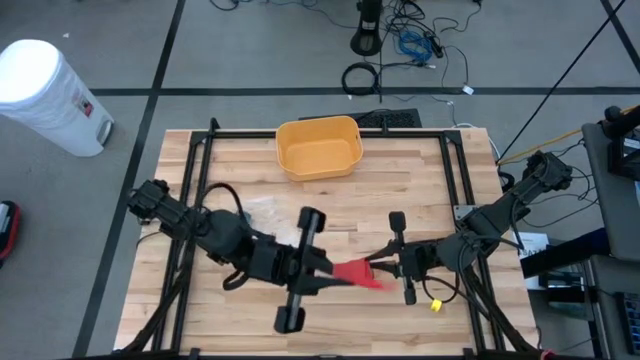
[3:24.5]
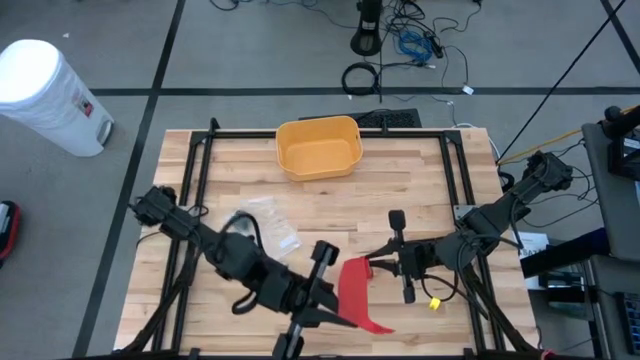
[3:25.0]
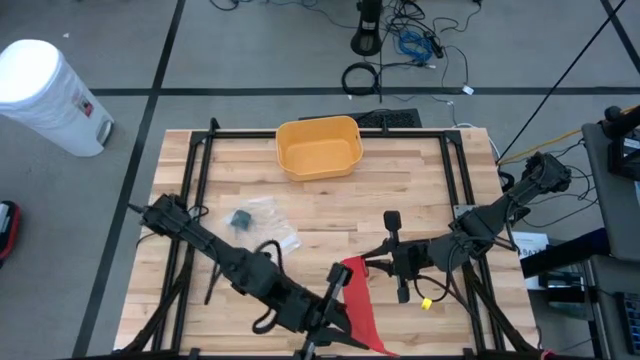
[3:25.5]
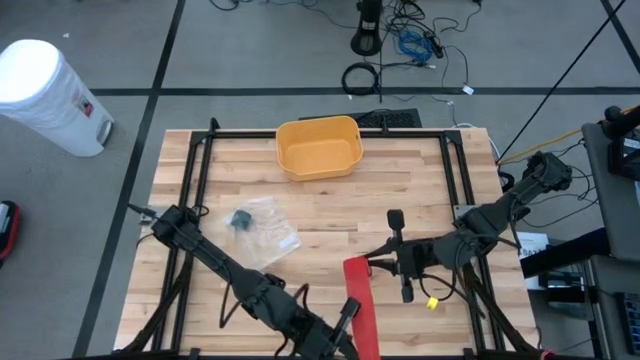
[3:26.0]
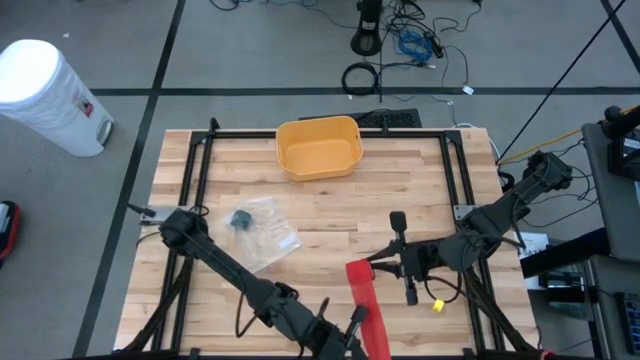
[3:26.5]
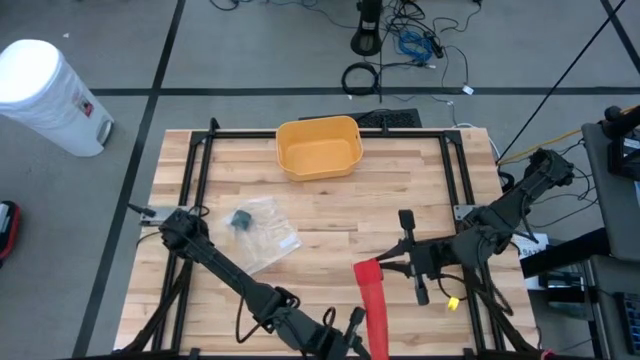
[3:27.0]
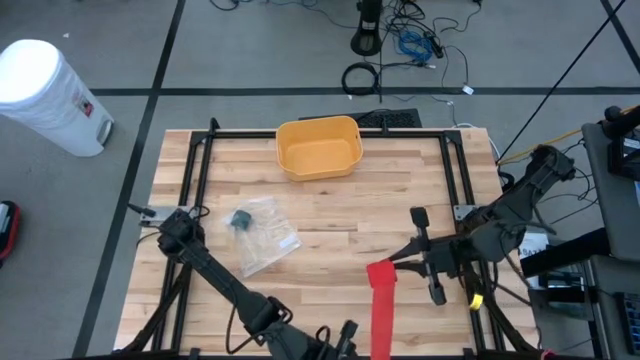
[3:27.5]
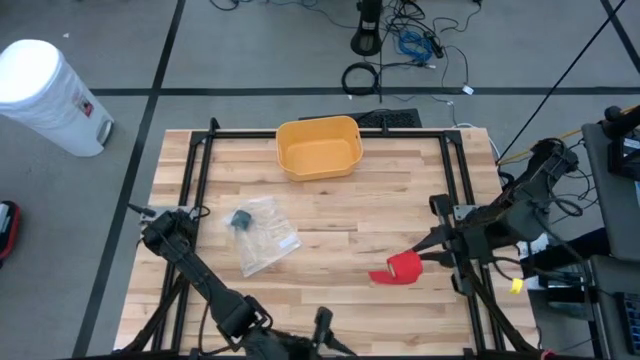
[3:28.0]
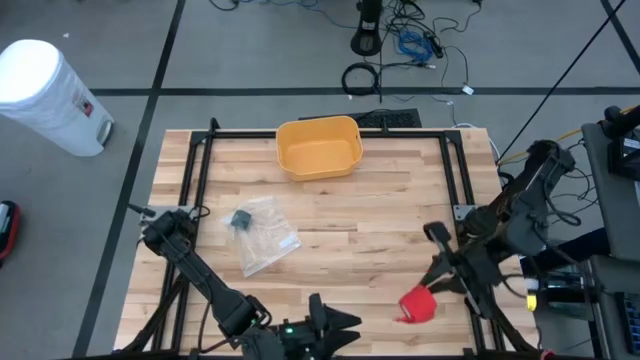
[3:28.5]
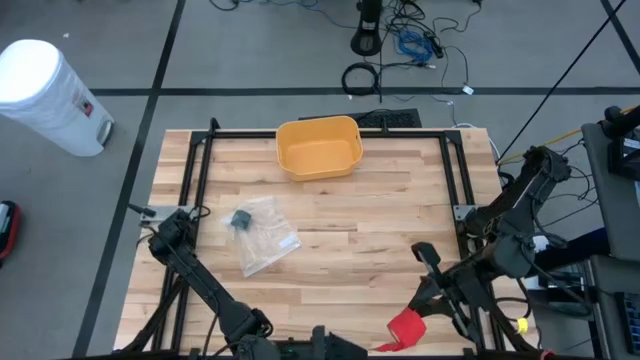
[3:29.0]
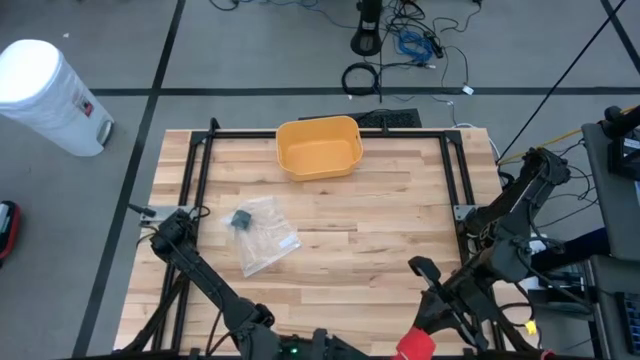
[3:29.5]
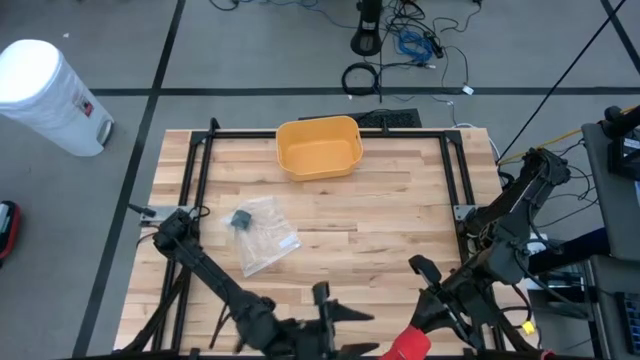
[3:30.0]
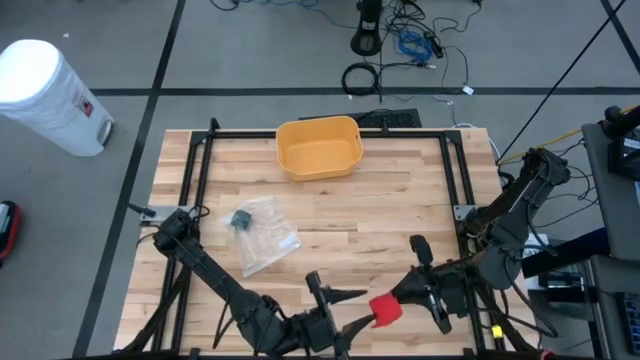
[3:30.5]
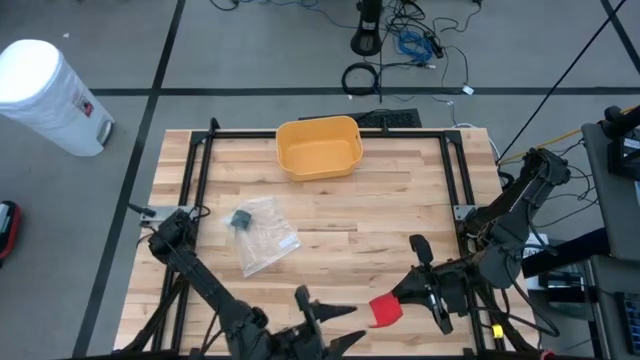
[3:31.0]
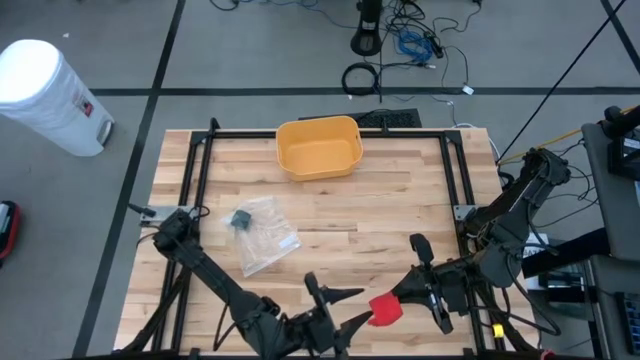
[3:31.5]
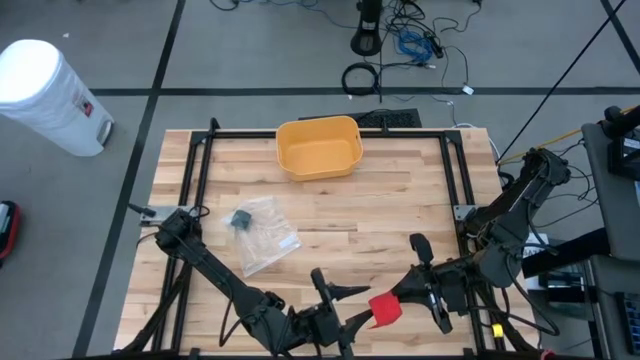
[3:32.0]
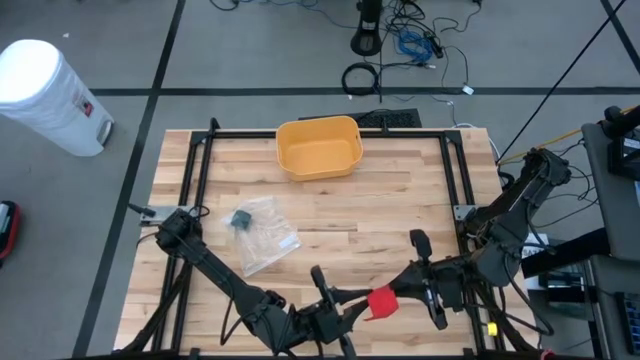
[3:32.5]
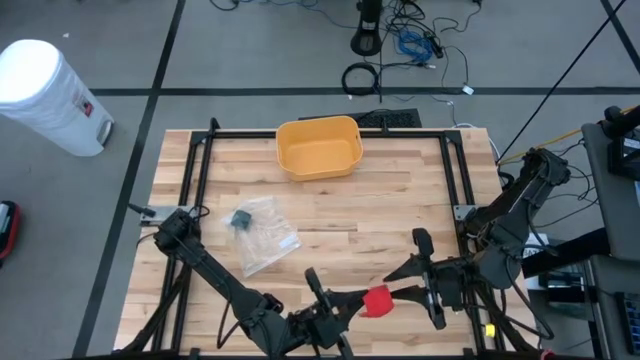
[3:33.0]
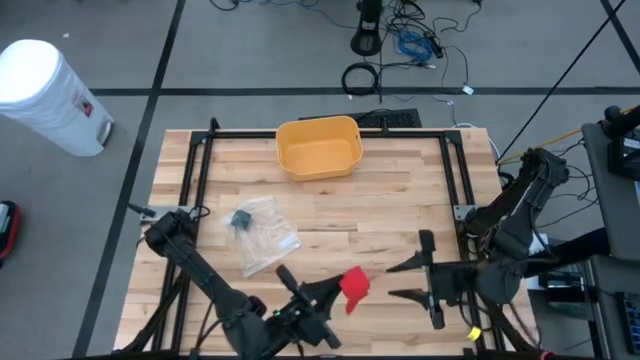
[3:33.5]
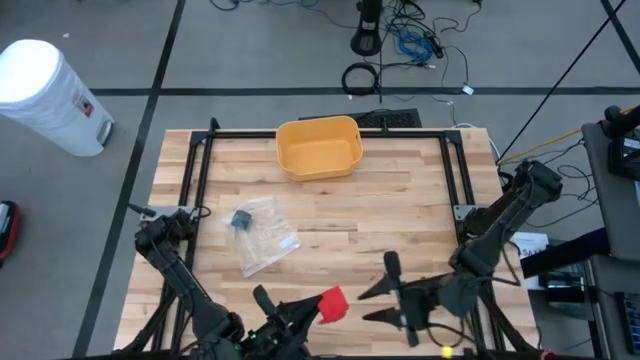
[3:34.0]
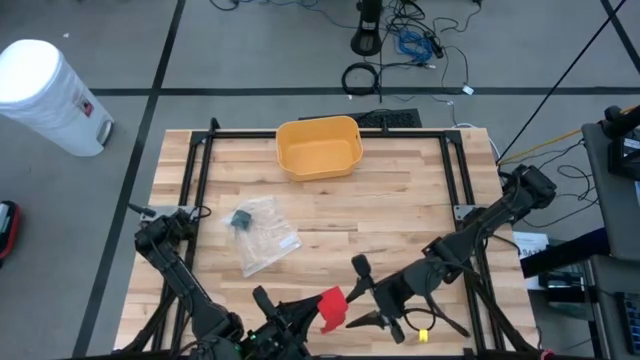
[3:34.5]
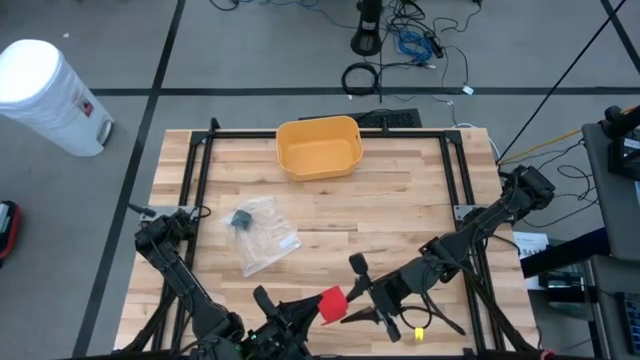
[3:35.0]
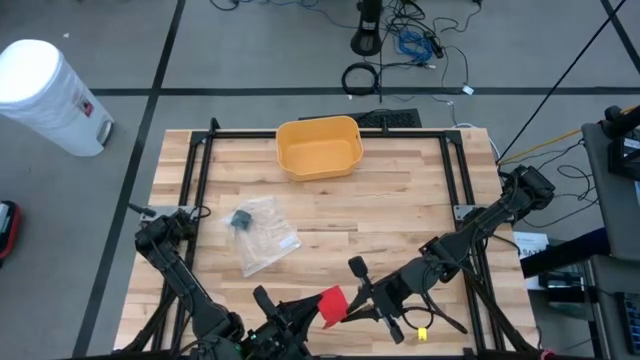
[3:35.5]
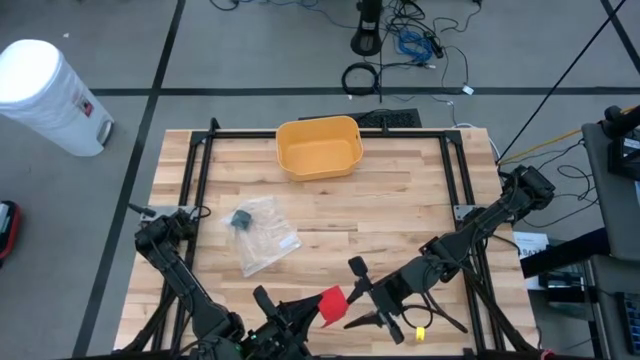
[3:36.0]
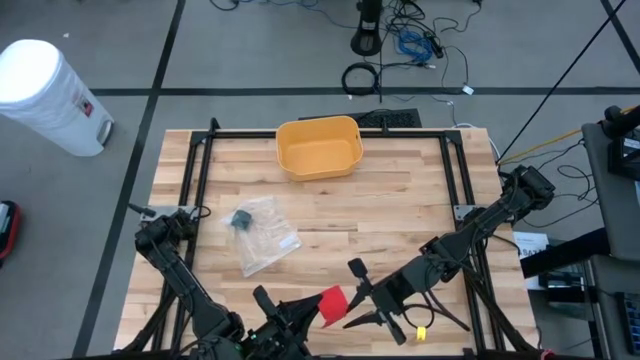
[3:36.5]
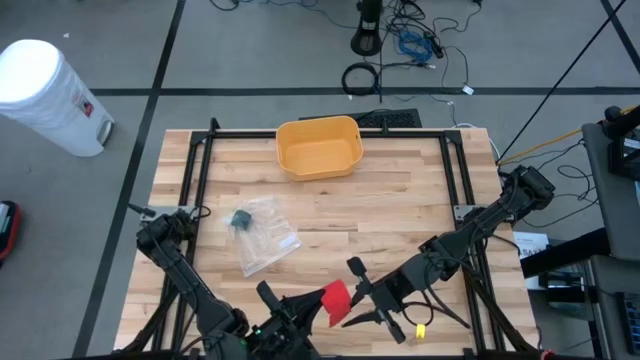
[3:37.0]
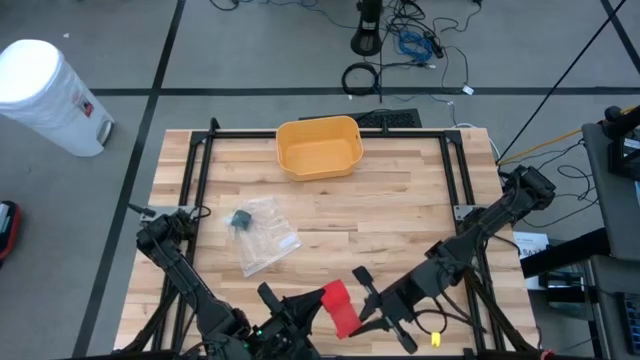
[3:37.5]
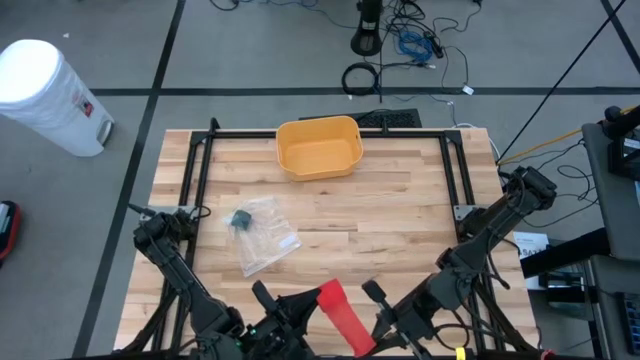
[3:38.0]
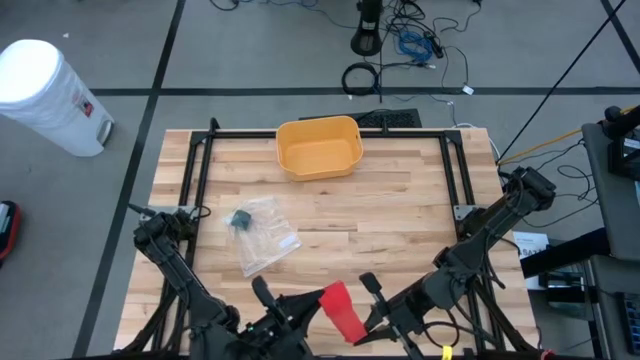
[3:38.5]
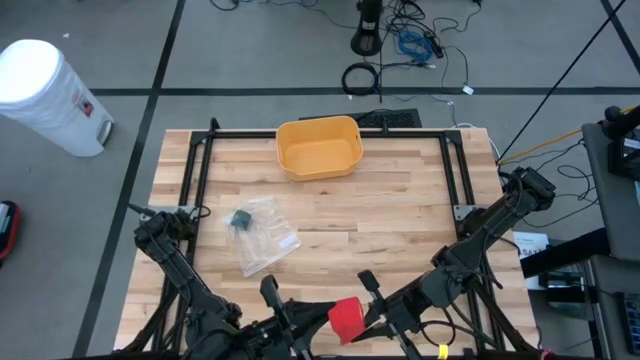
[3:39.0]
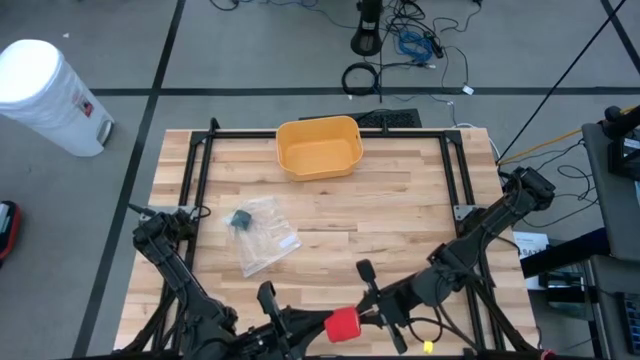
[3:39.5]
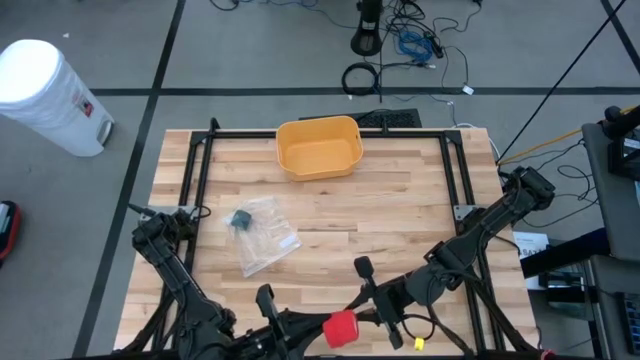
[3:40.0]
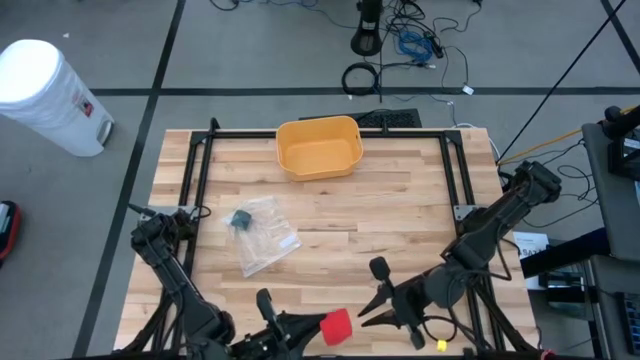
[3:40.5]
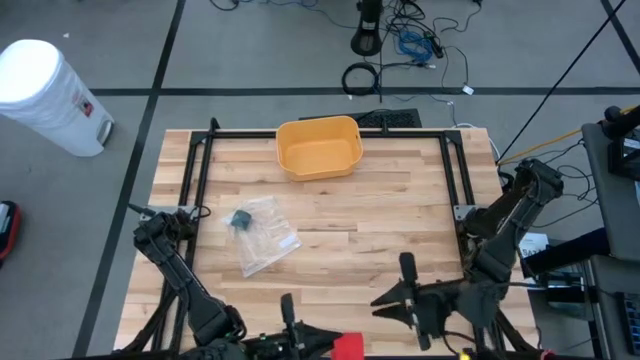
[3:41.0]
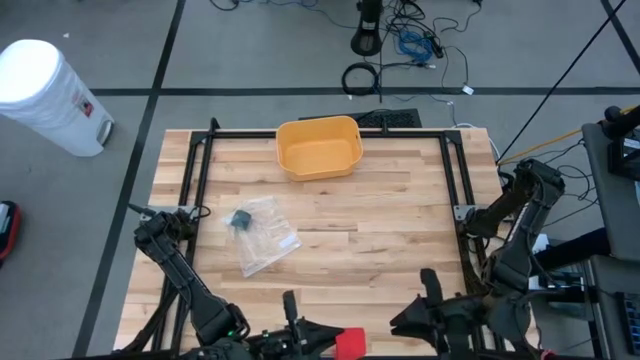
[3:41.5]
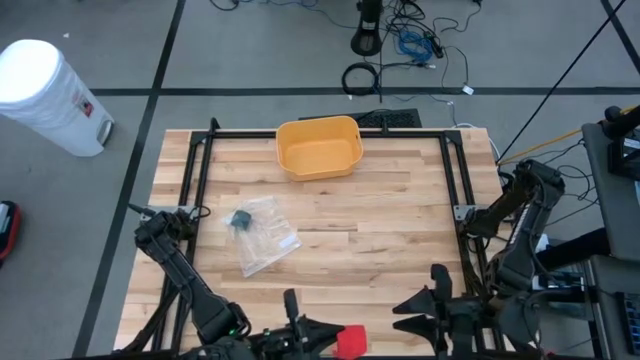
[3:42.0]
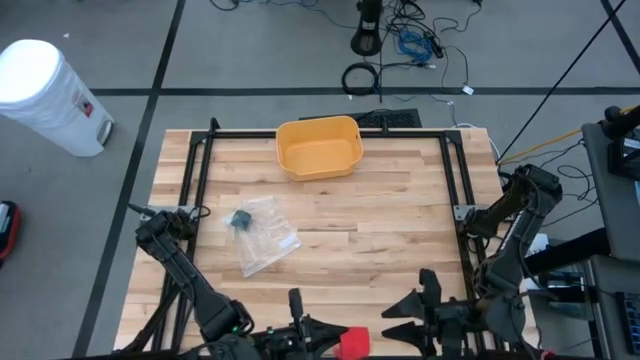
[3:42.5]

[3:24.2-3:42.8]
Task: Roll bandage
Roll the red bandage

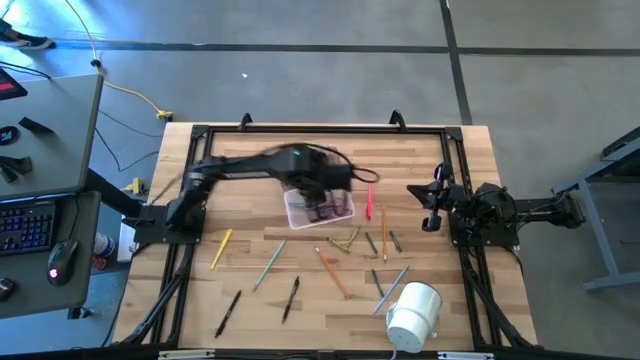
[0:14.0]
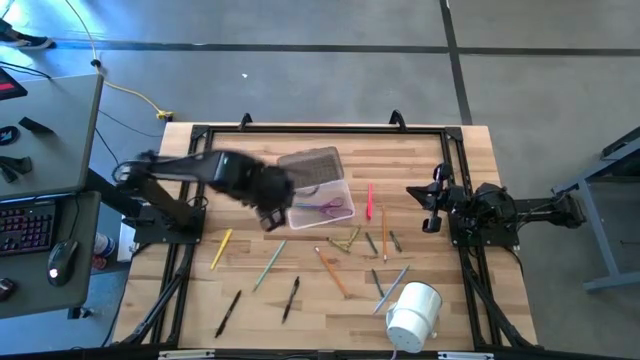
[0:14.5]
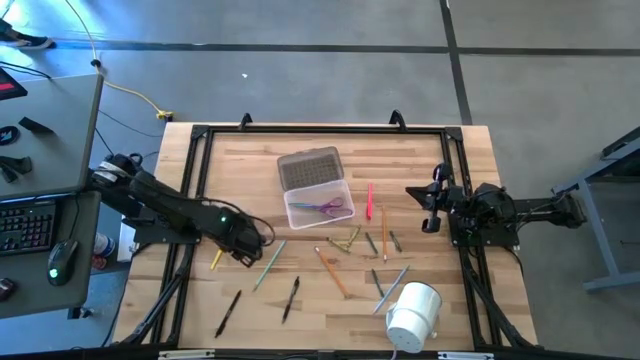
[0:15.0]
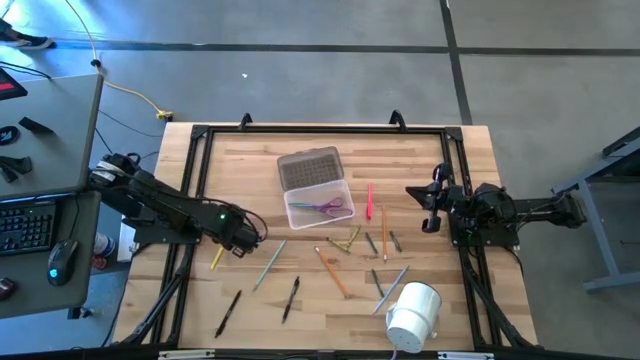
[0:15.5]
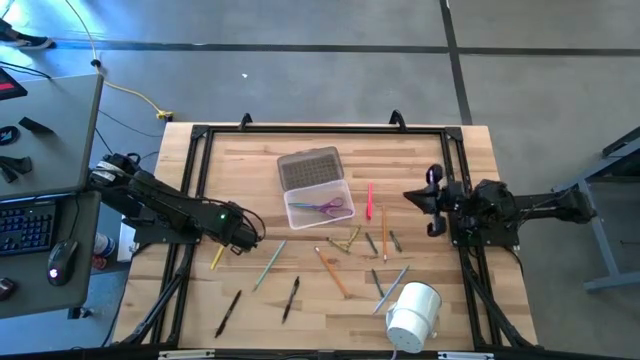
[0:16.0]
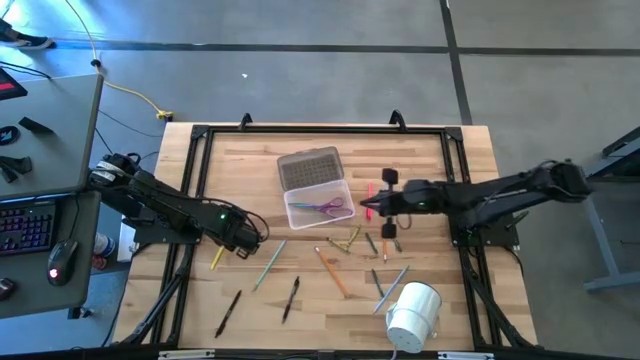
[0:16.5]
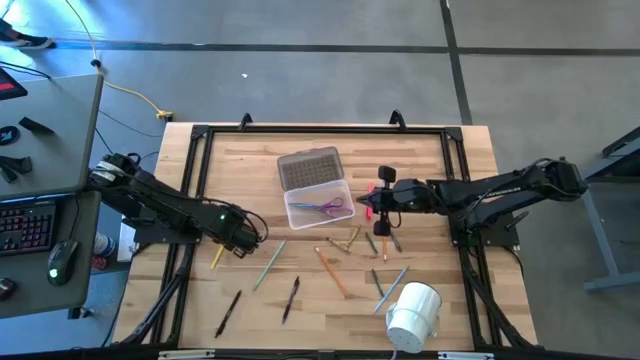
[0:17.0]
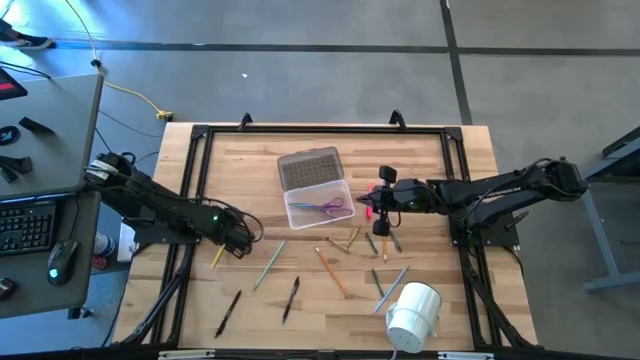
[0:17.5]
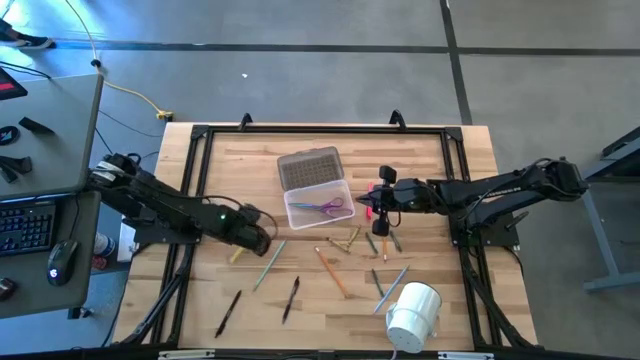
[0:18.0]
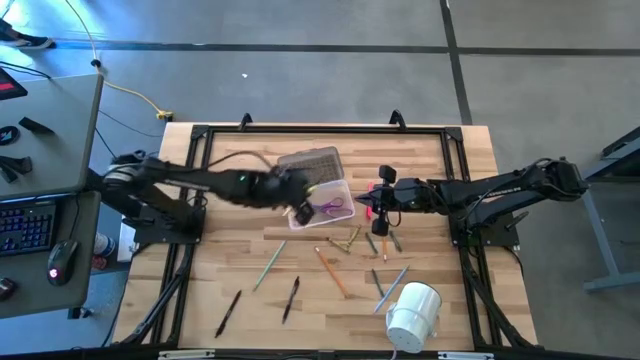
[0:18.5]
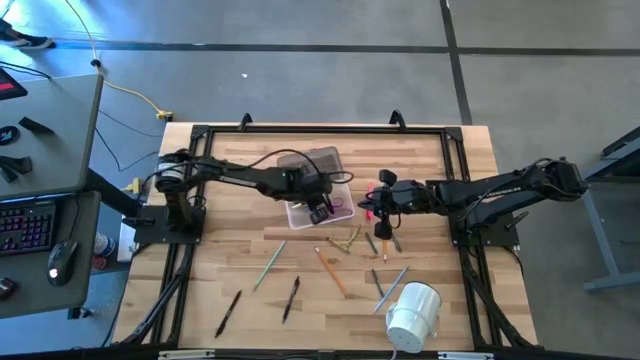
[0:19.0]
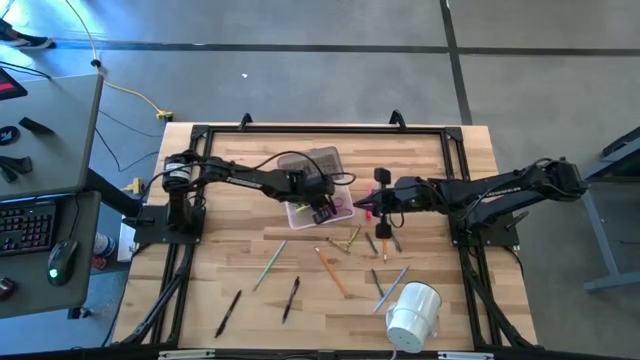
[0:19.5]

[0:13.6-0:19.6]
Task: Pick & place school supplies into a supply box
Put the yellow pen into the supply box
